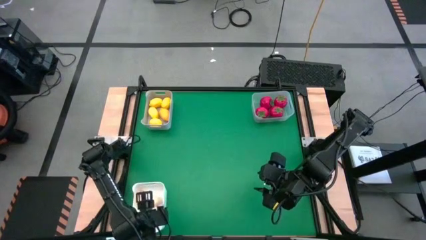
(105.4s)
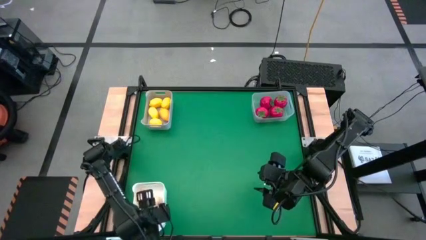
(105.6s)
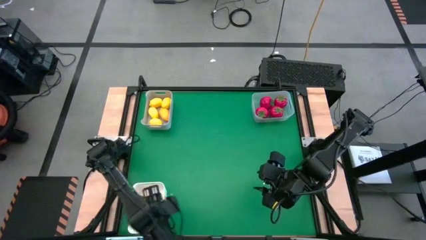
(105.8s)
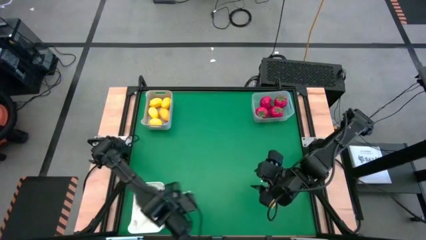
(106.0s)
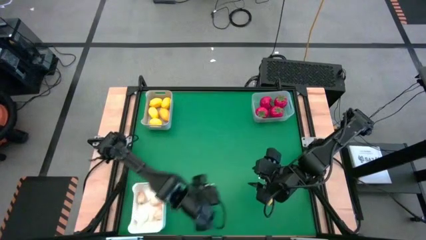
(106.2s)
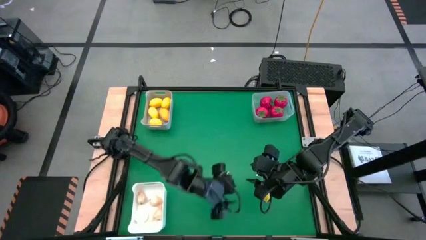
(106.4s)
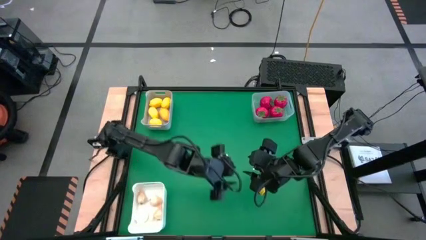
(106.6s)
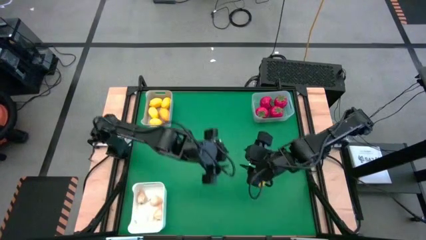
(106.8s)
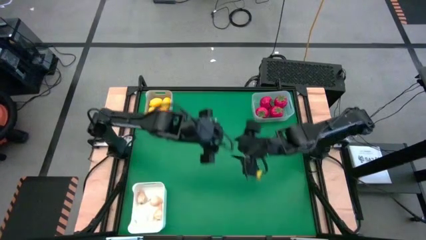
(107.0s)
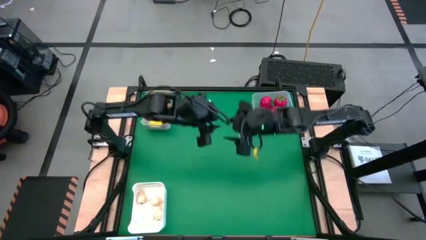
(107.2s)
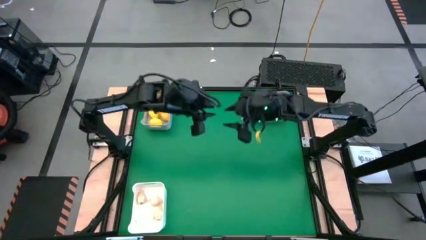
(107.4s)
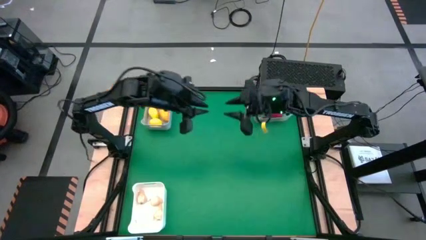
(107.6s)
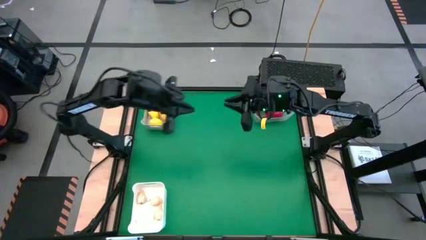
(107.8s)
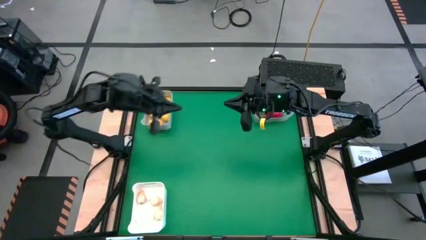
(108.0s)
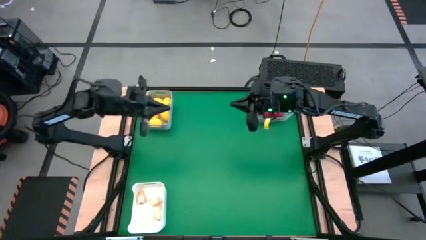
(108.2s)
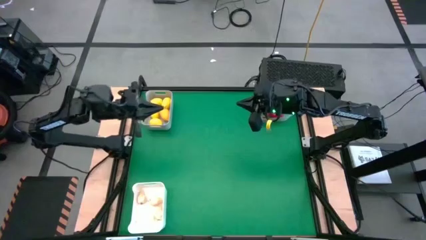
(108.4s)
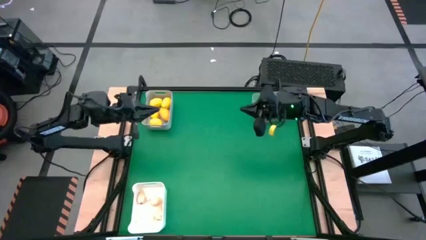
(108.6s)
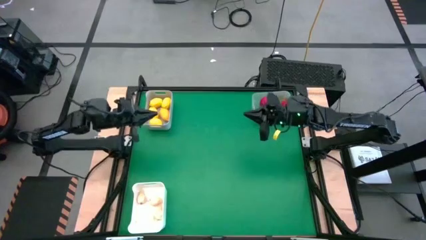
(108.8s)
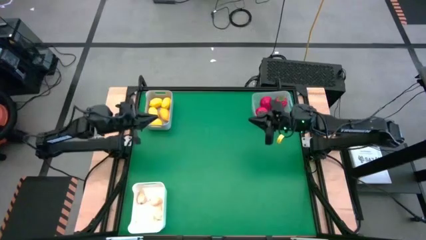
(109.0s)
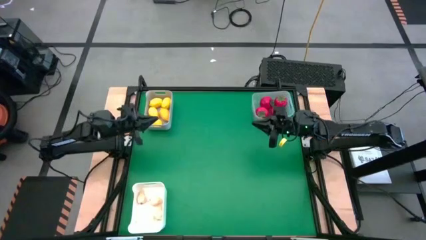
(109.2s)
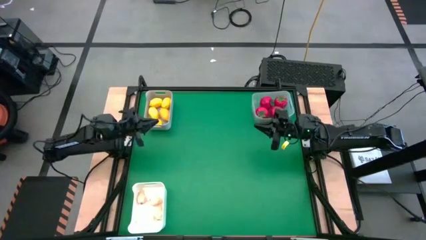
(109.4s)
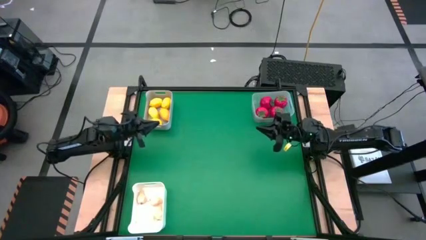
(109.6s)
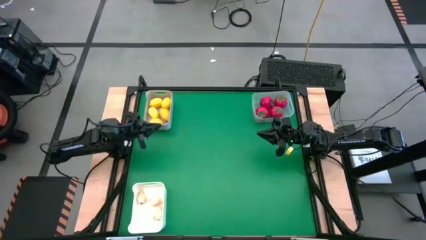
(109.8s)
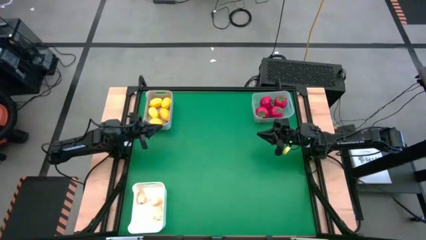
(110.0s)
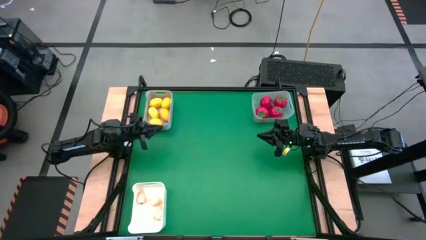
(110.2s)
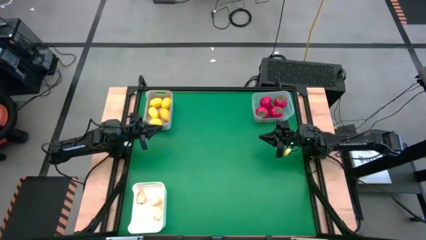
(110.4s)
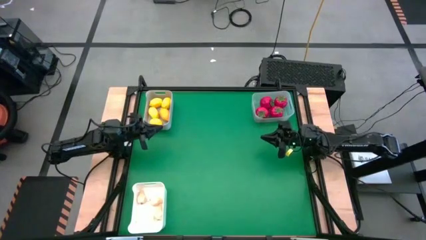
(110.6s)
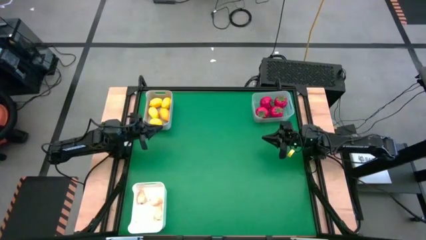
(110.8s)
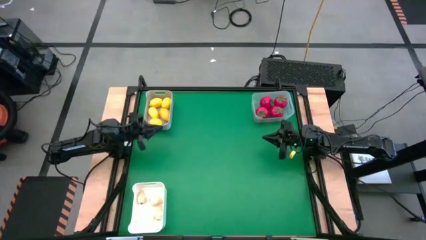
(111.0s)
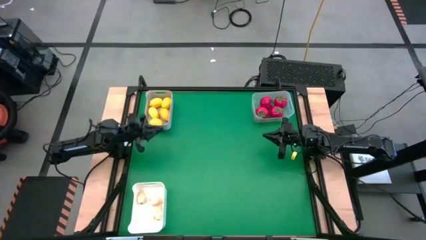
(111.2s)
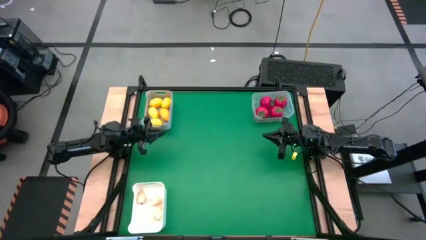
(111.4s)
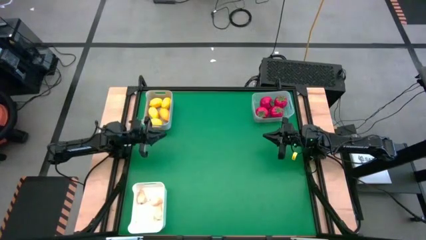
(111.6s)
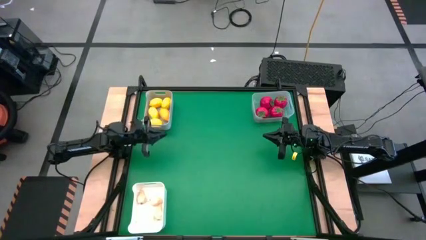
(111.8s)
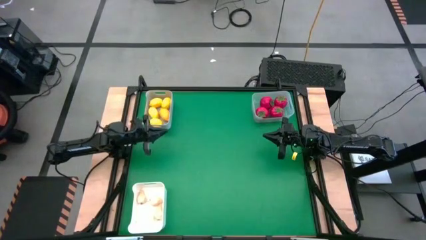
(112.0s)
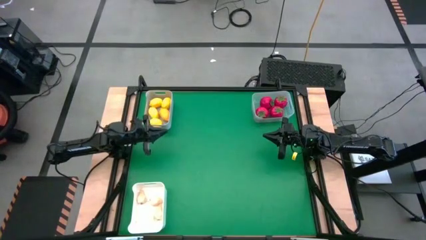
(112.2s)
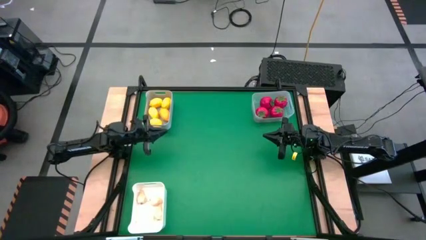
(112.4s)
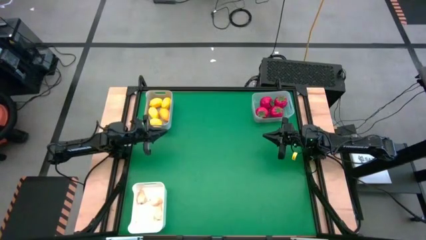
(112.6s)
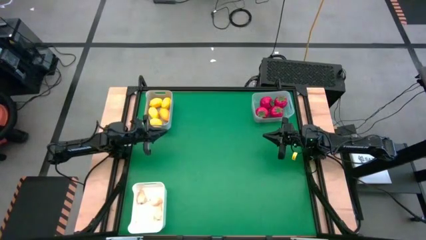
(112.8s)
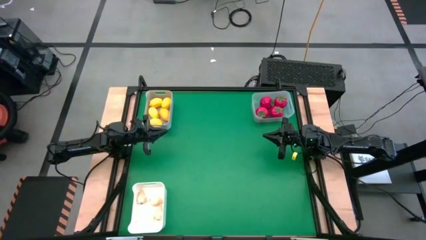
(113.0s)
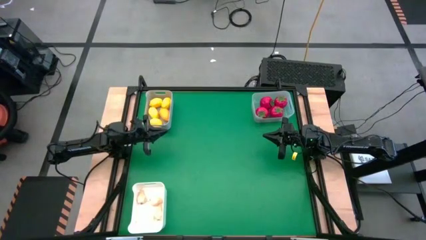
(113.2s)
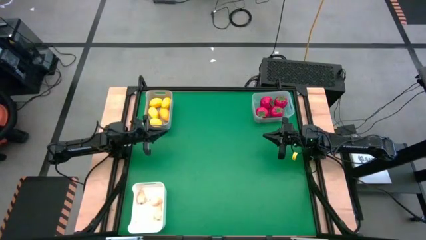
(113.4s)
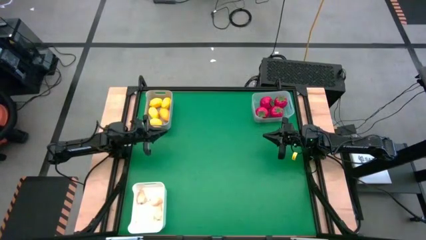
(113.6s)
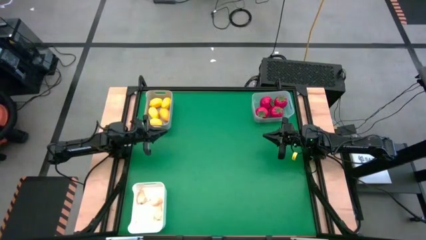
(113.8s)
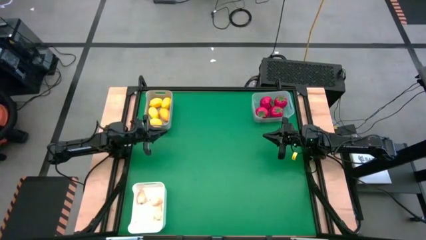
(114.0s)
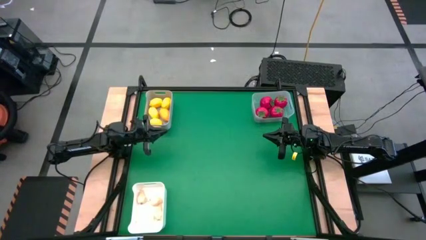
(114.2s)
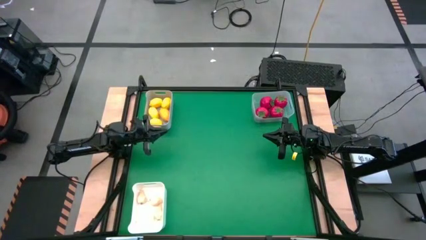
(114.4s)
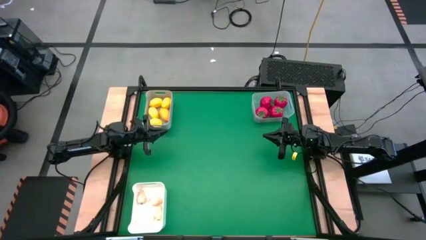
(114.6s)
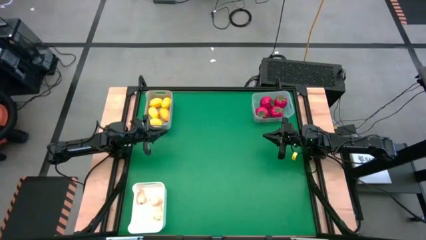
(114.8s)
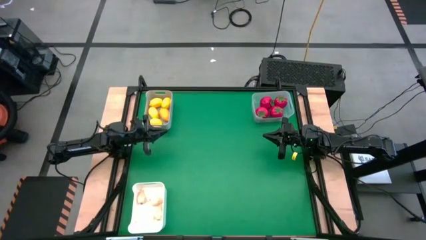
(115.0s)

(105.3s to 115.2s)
Task: Sort produce into baskets
Return to Home Position

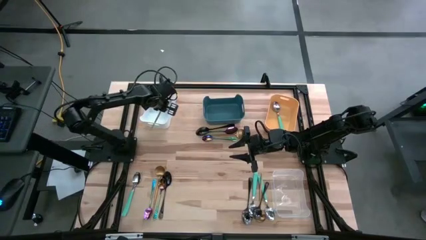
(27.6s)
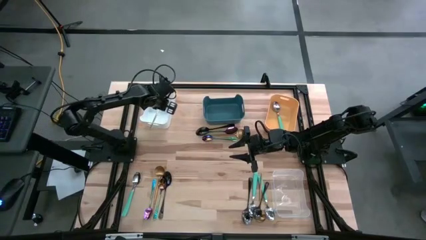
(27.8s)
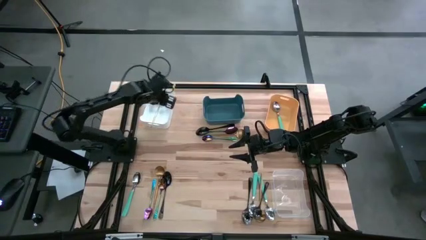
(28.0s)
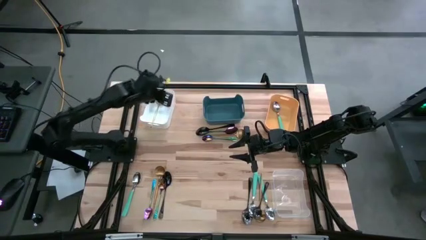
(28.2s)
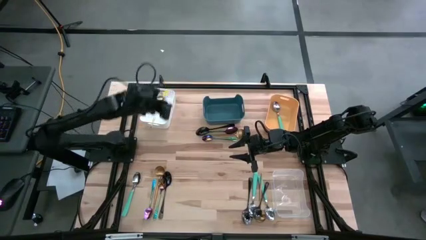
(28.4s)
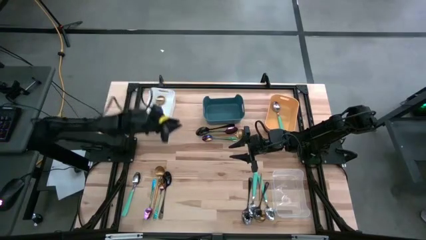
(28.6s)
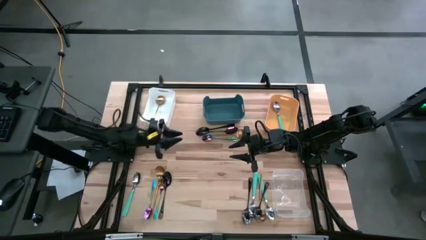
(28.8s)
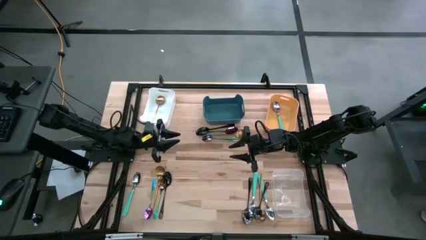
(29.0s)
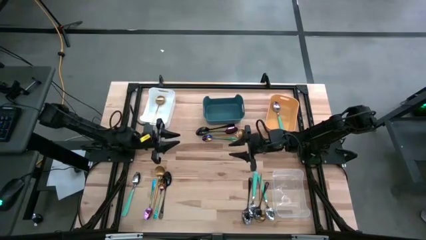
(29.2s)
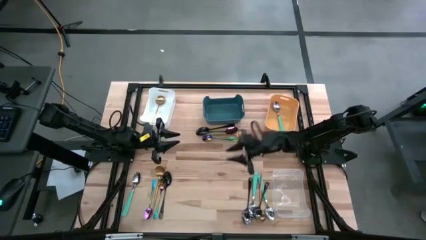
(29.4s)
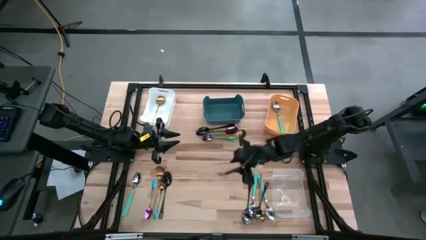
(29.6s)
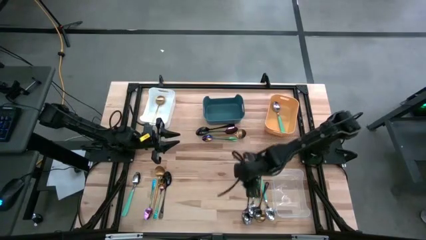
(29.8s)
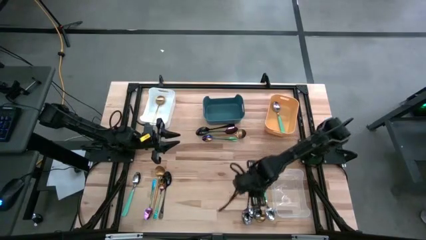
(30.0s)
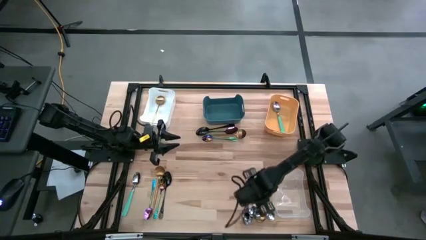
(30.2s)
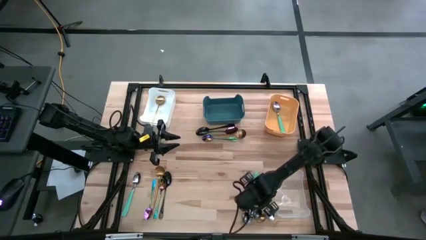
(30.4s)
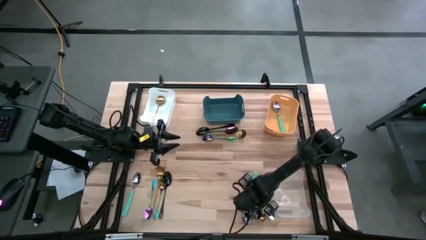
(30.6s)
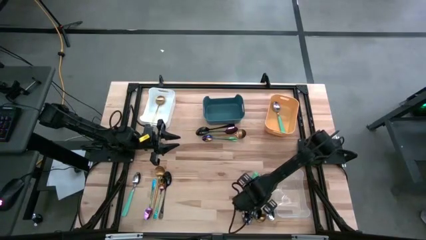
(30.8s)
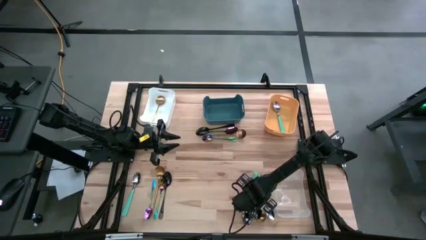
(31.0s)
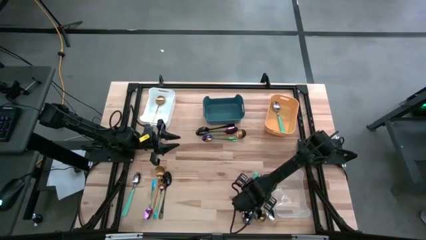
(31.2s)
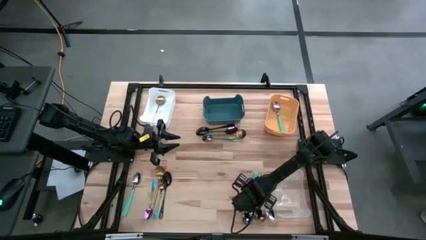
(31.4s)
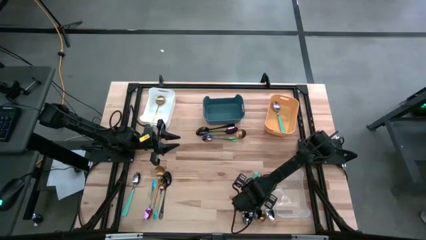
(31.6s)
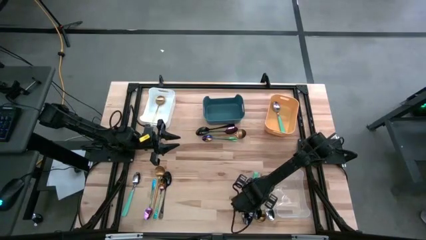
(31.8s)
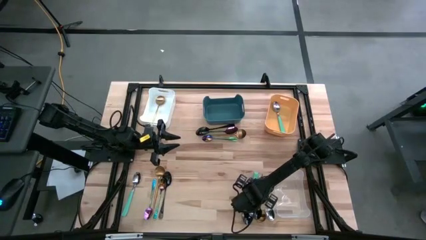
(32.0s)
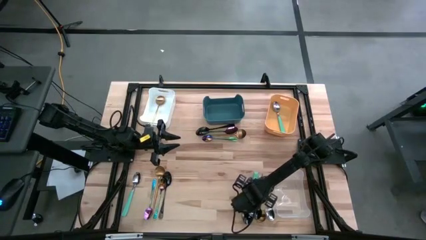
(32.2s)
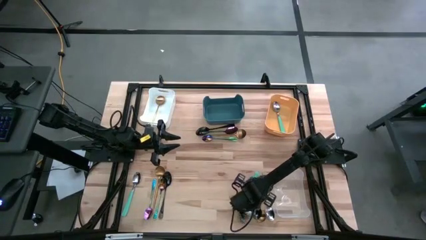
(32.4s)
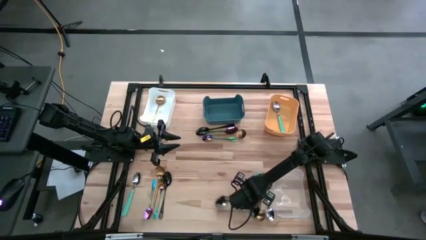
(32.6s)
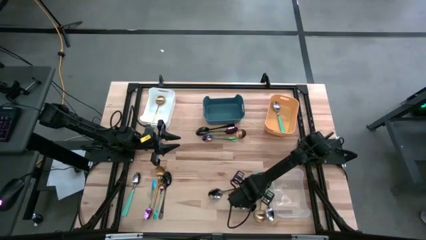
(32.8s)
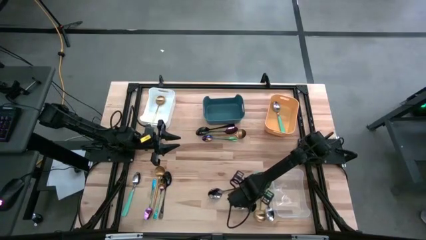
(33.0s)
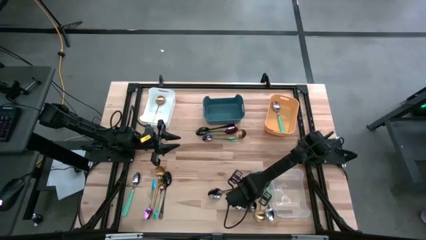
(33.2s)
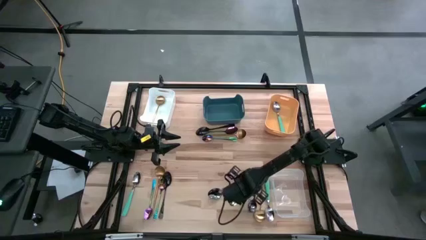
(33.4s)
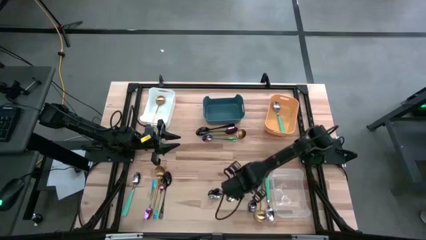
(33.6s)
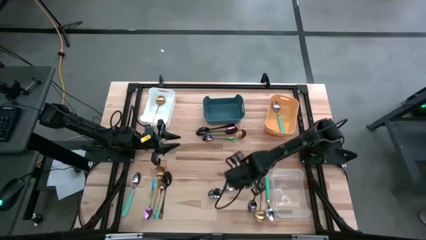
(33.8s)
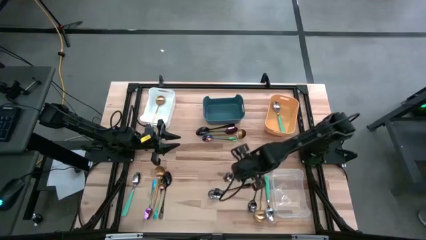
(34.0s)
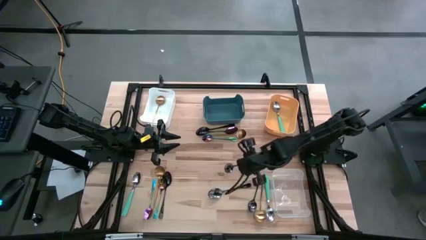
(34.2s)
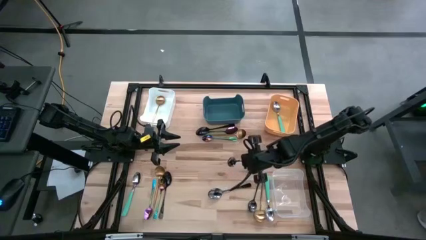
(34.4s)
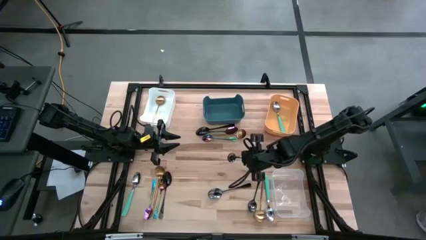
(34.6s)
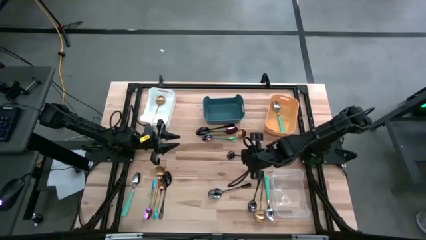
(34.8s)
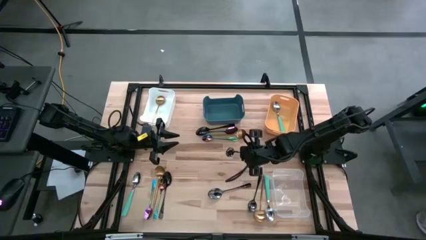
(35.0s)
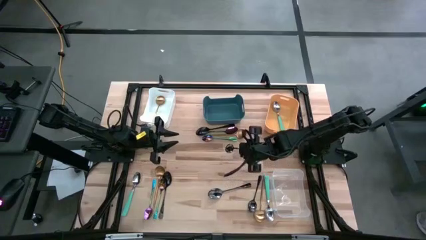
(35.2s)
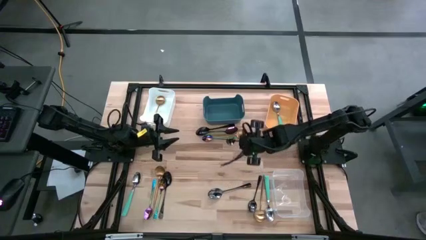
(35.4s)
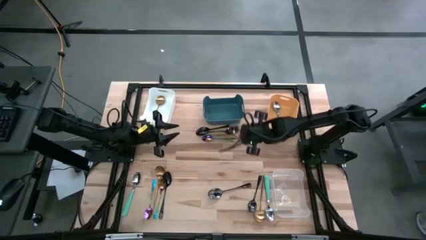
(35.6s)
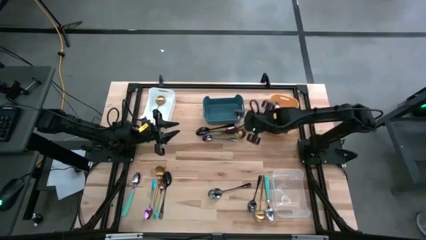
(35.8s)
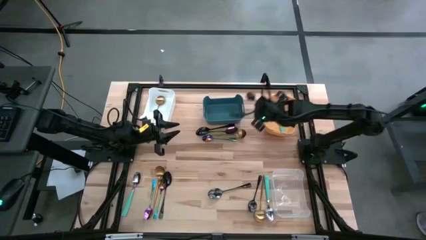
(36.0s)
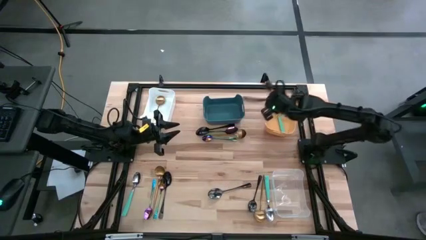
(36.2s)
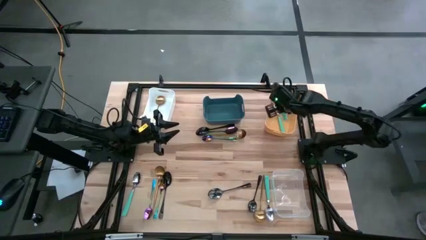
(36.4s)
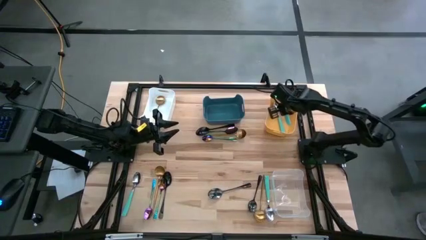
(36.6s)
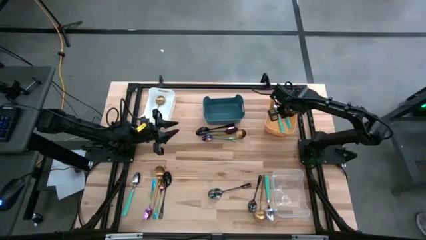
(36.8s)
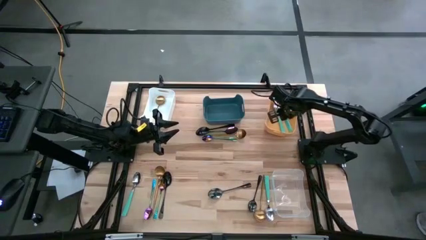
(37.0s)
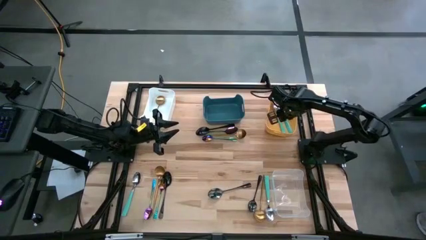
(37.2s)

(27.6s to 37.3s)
Task: Sort silverware by color (type)
Put the light green spoon into the orange bin
